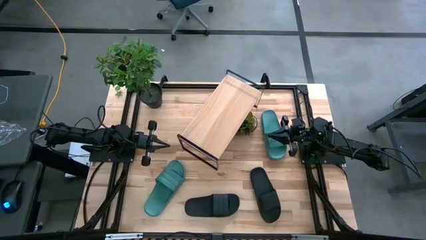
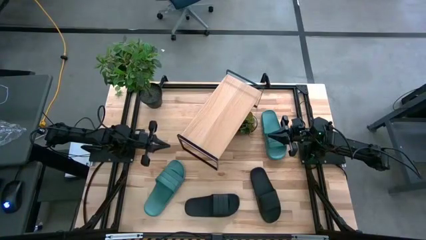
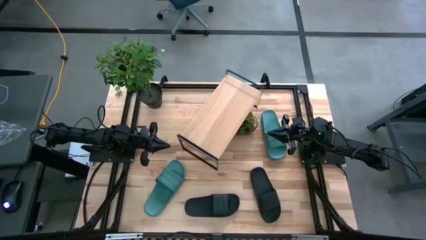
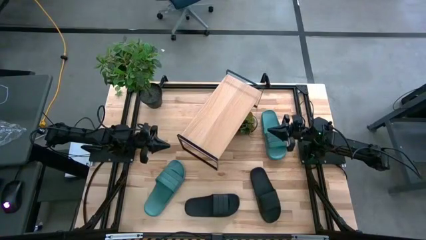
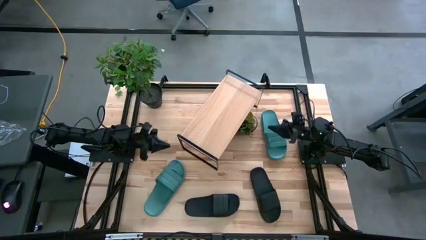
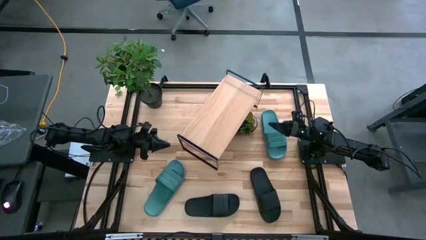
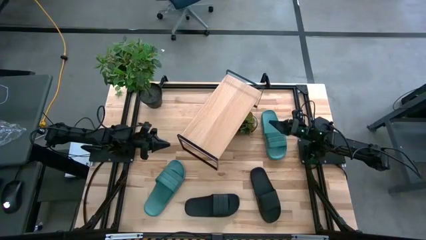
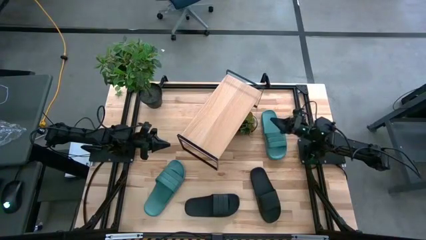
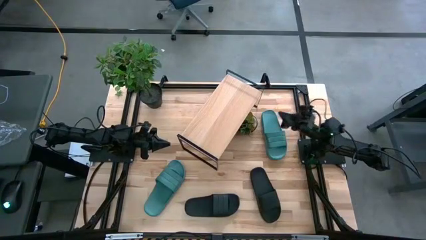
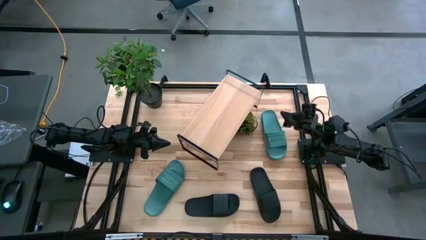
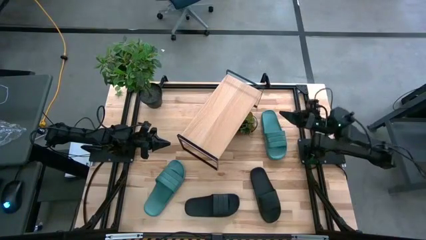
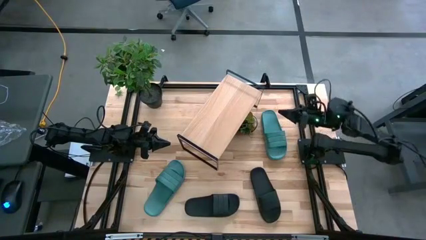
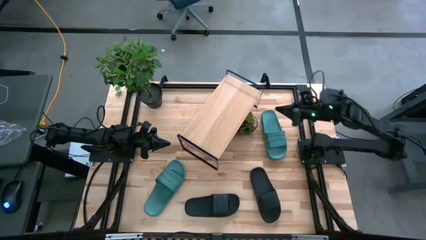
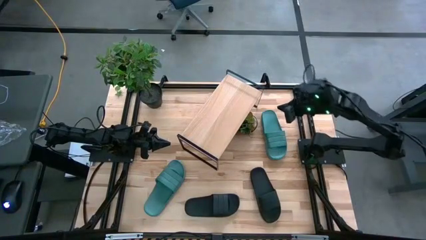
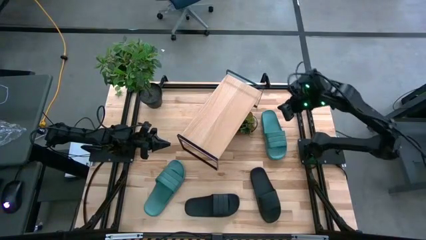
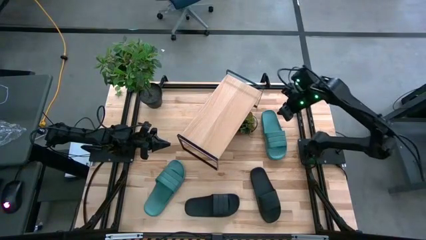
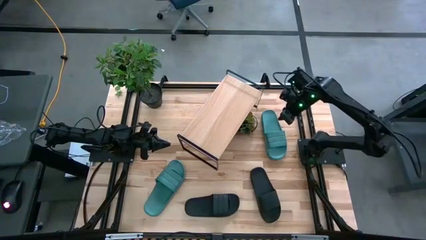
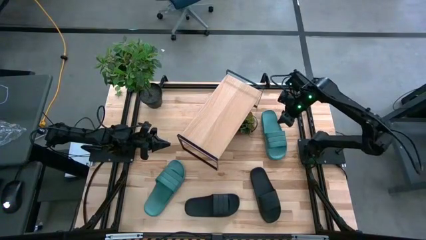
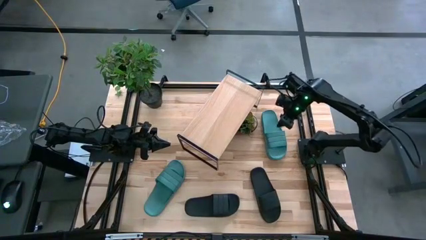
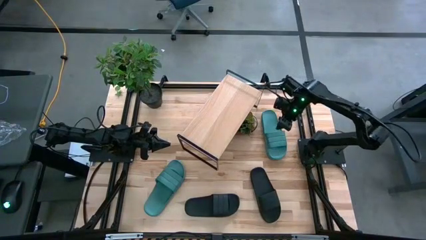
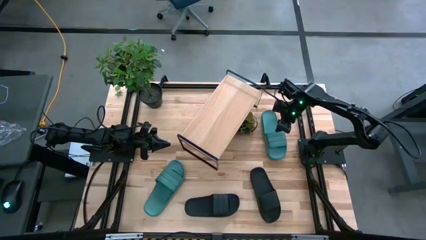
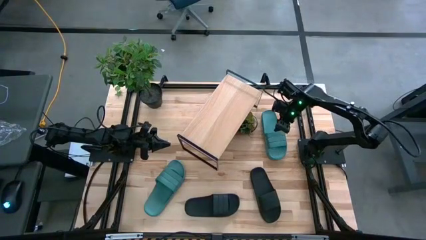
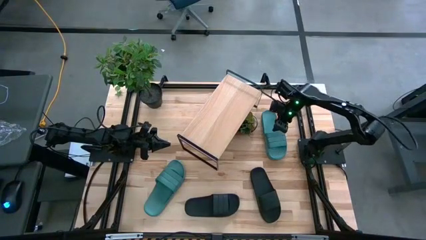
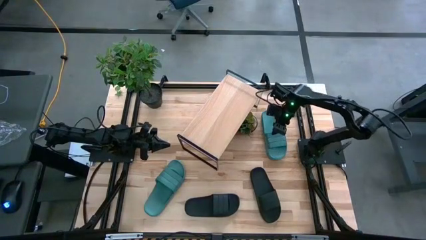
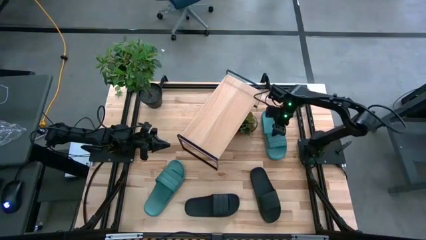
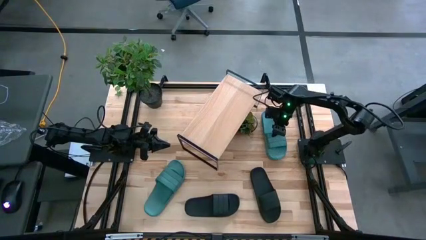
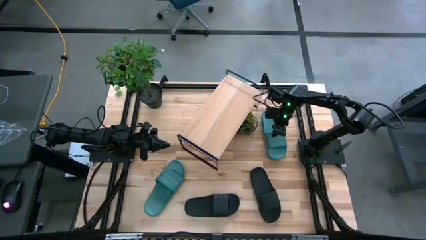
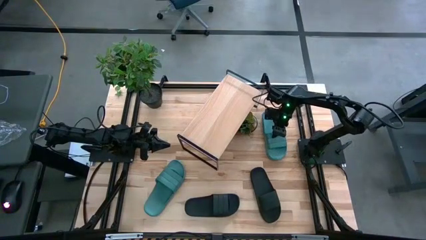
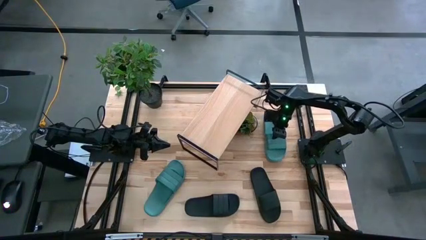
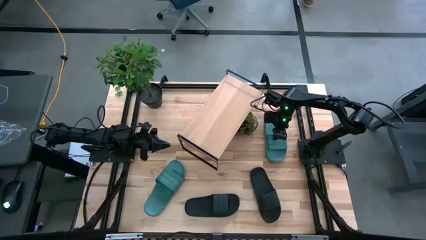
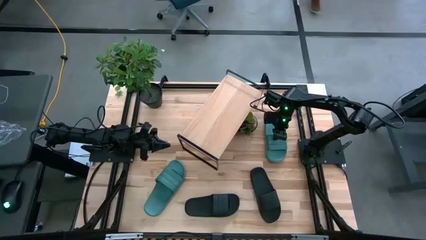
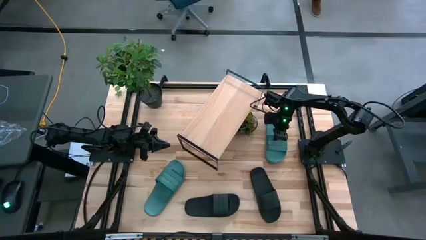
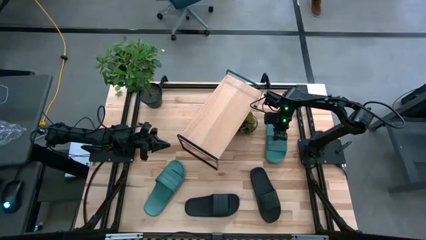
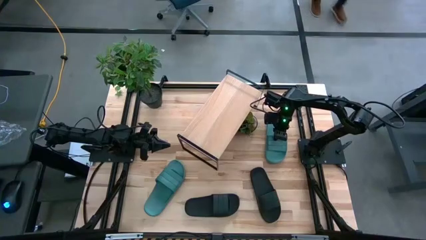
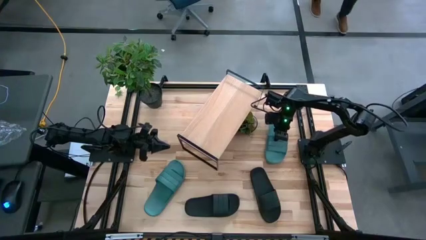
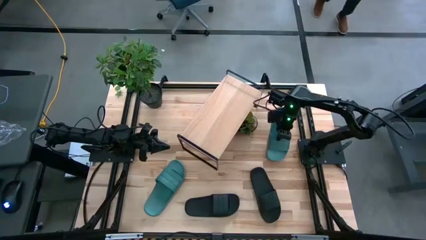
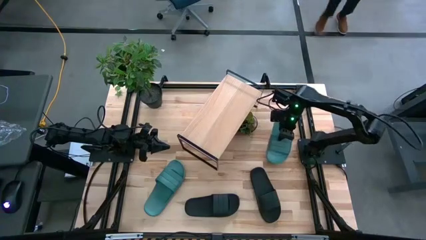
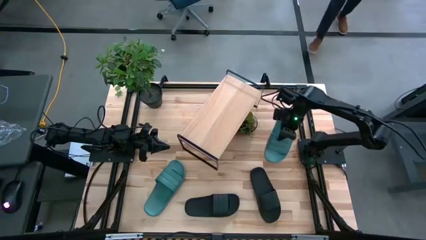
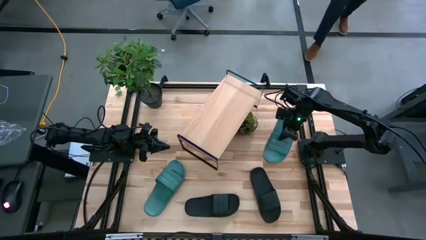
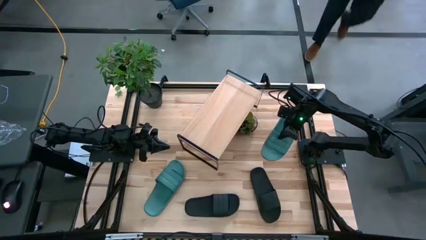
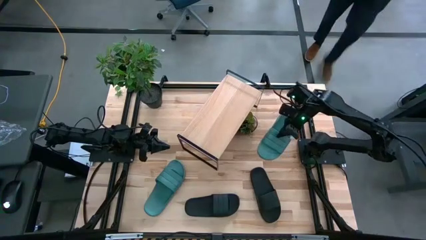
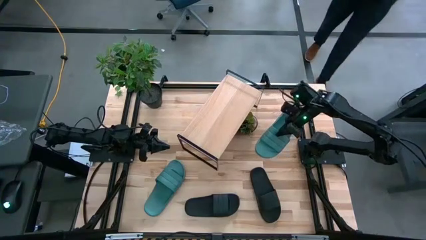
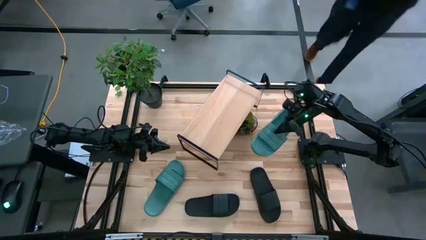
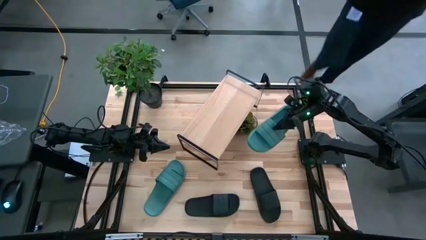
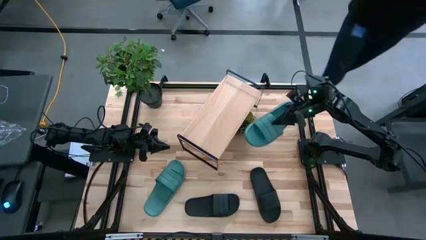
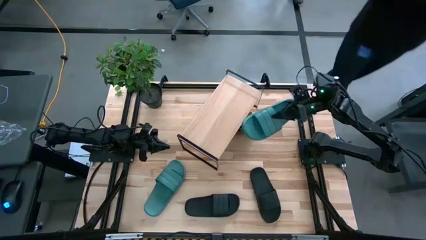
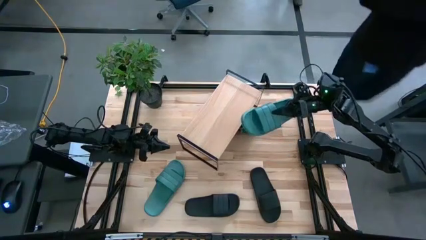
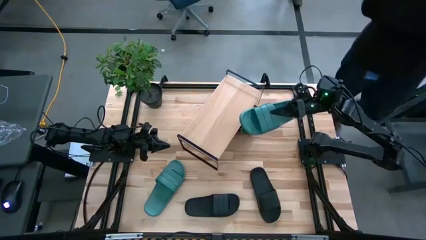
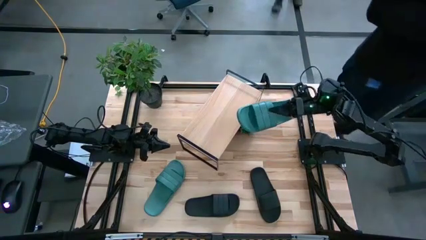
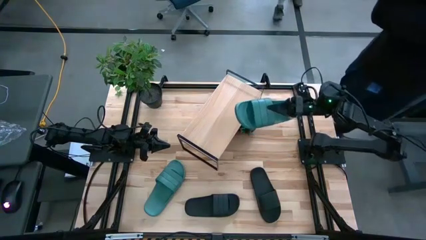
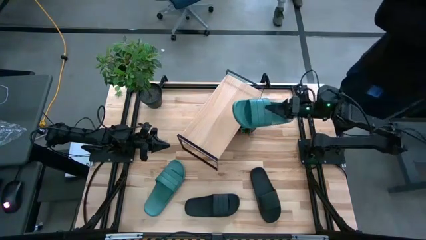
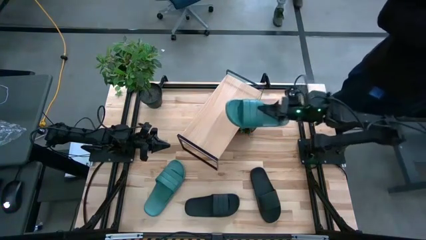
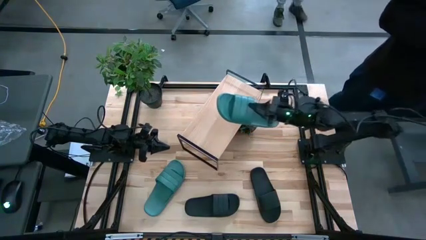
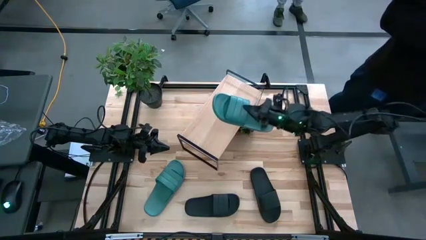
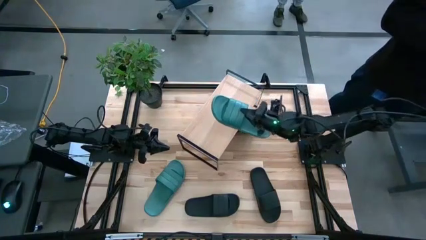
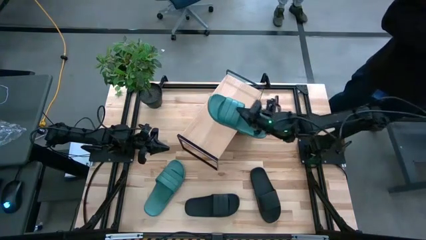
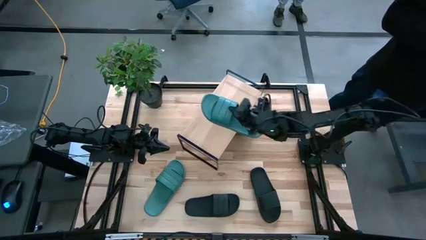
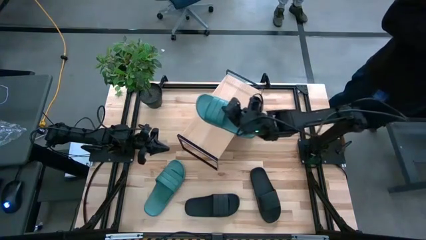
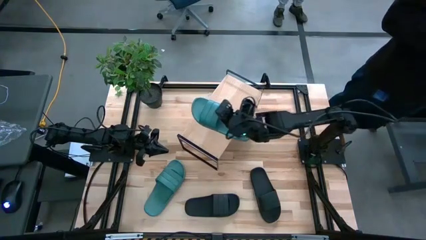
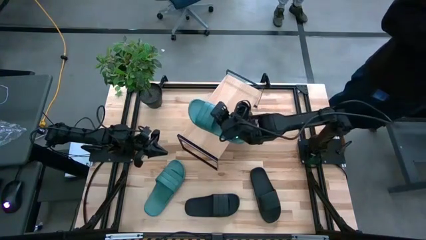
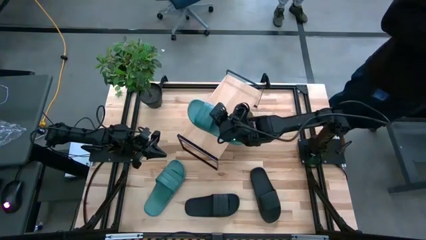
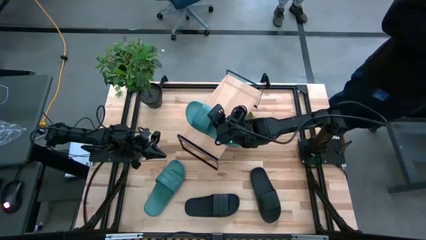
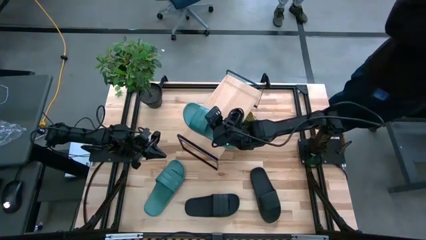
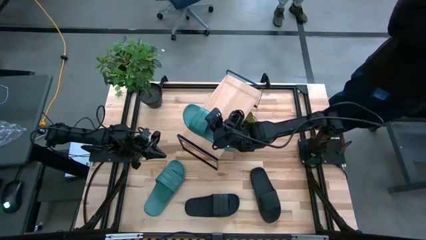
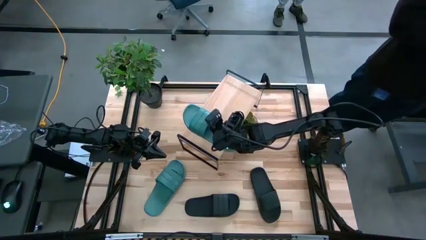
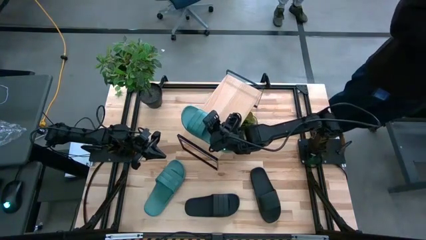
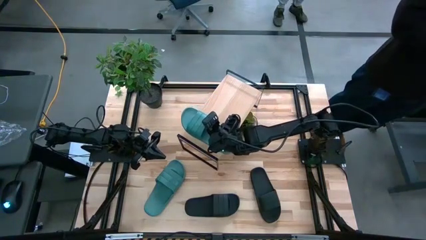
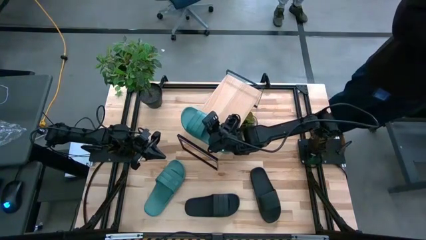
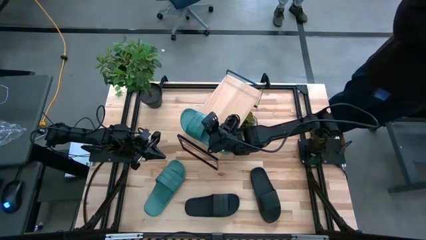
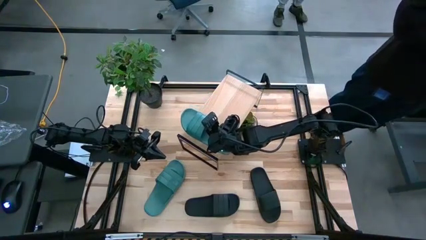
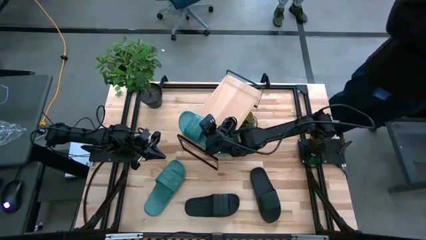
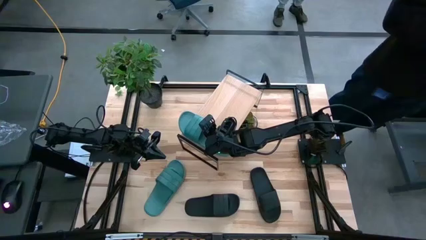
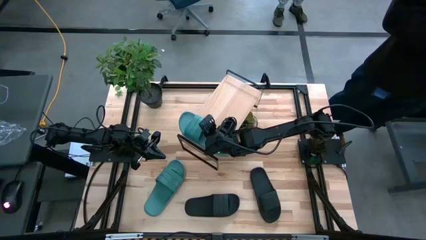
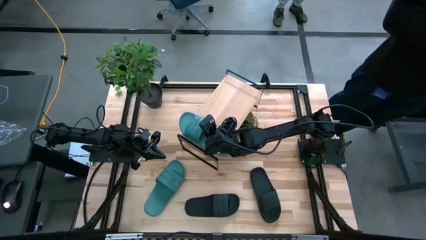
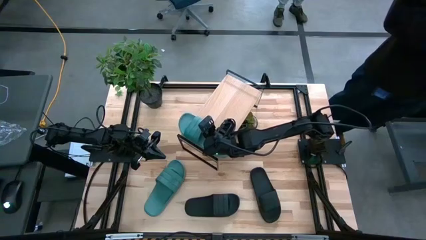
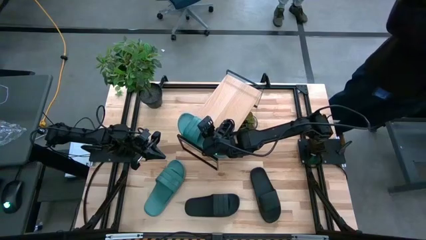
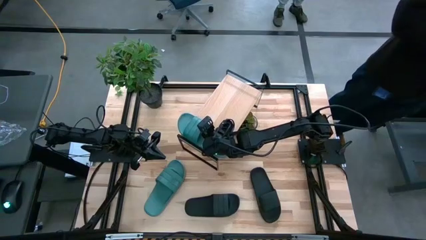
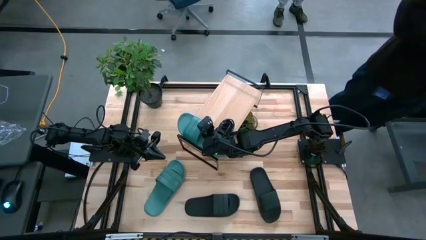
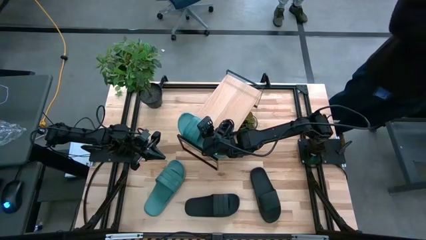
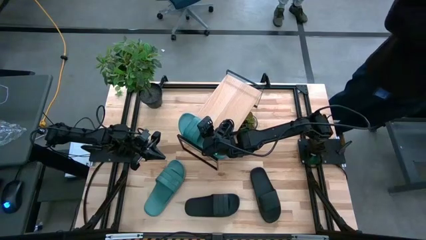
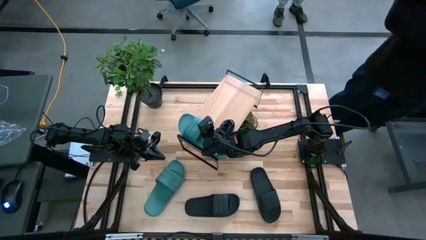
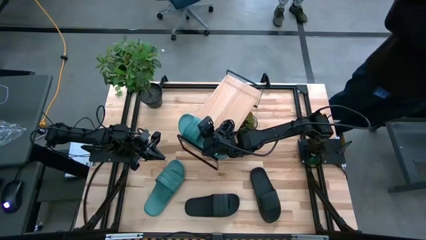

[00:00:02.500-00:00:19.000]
Task: Pick and place slides into the shelf
Put the right blue slide on the shelf
